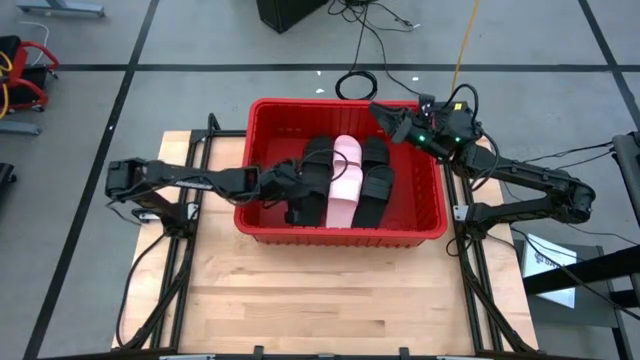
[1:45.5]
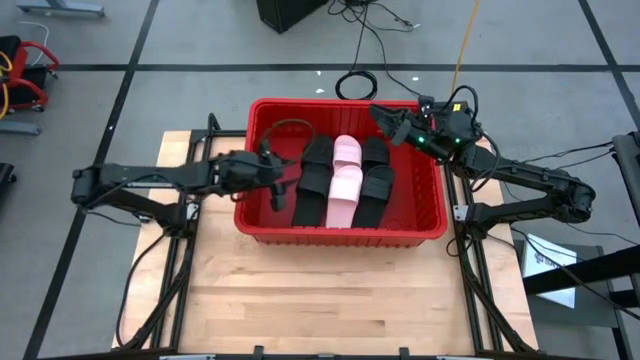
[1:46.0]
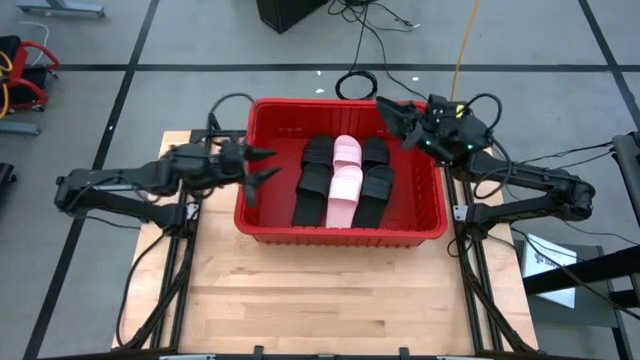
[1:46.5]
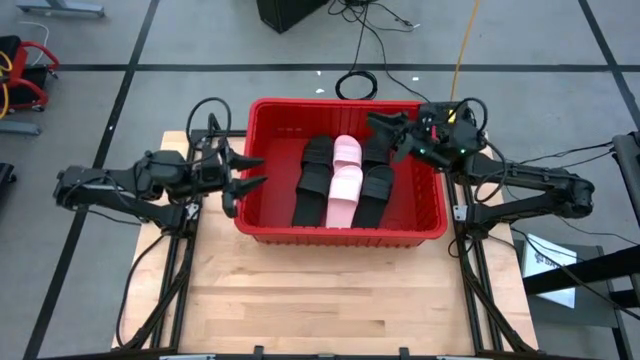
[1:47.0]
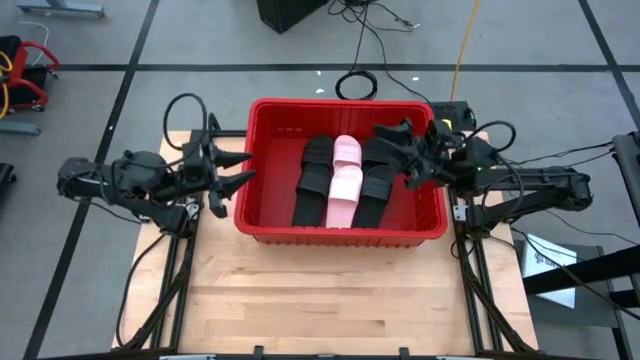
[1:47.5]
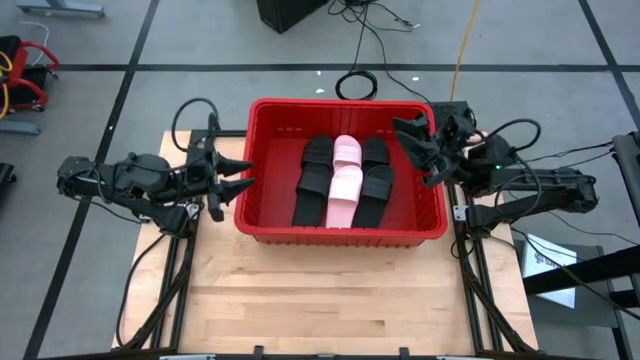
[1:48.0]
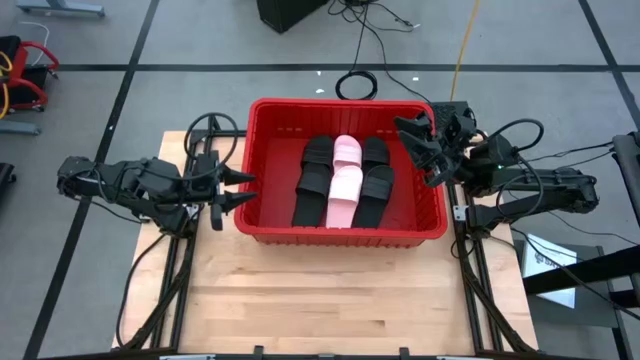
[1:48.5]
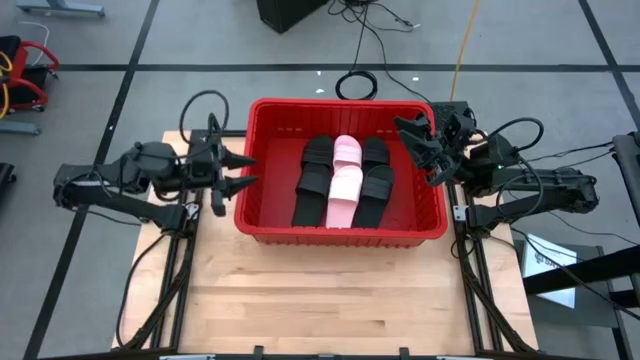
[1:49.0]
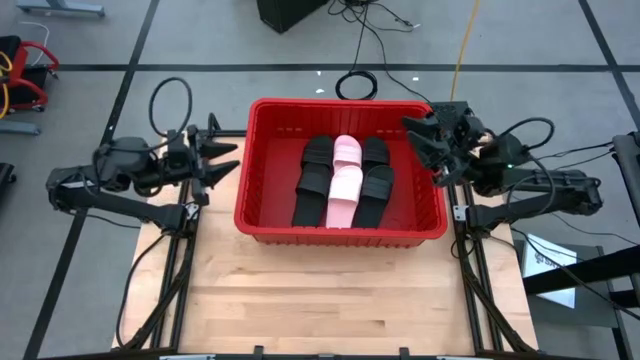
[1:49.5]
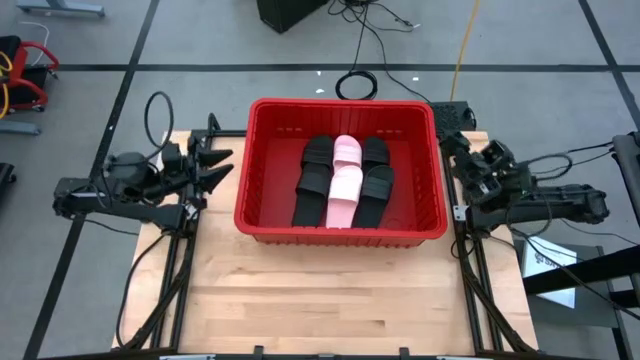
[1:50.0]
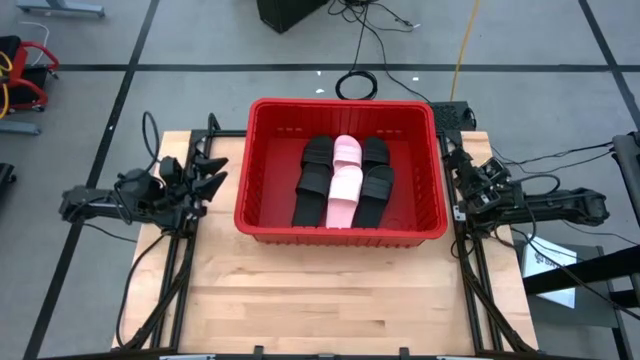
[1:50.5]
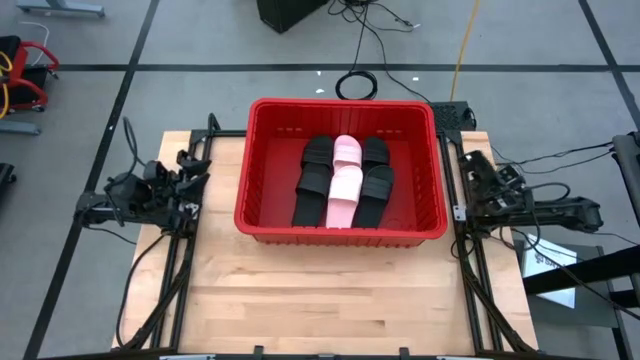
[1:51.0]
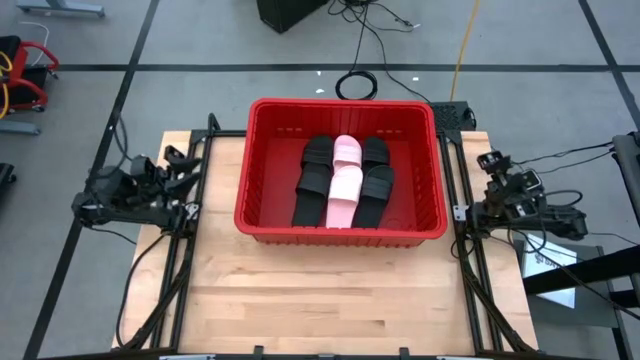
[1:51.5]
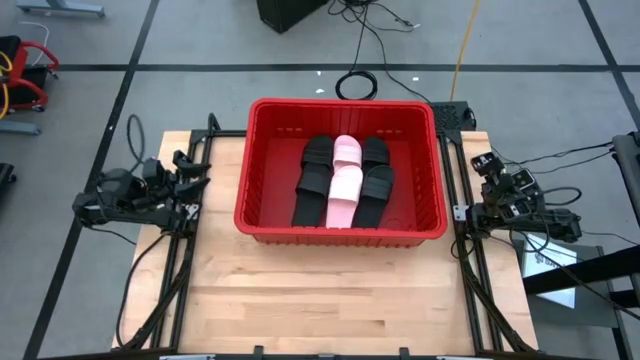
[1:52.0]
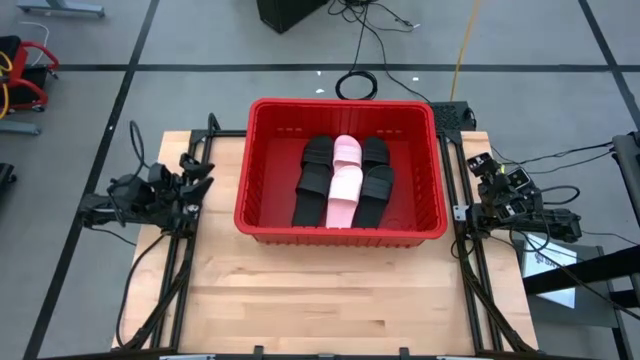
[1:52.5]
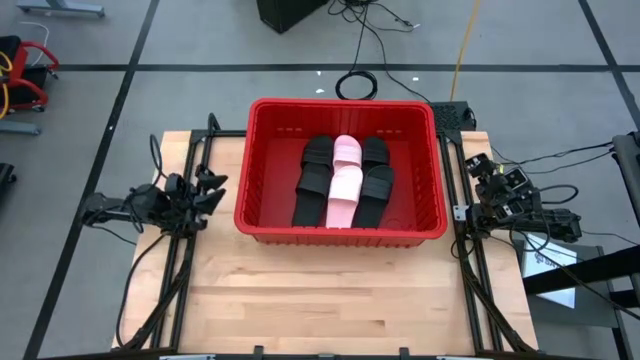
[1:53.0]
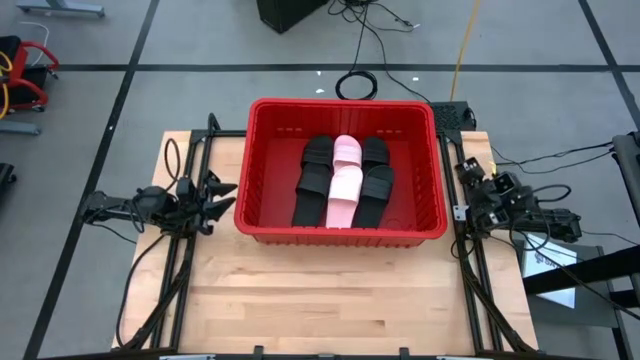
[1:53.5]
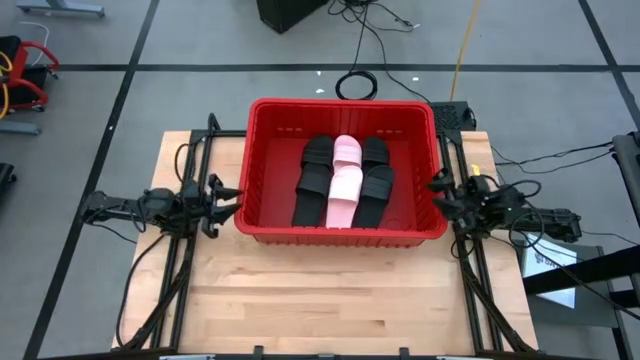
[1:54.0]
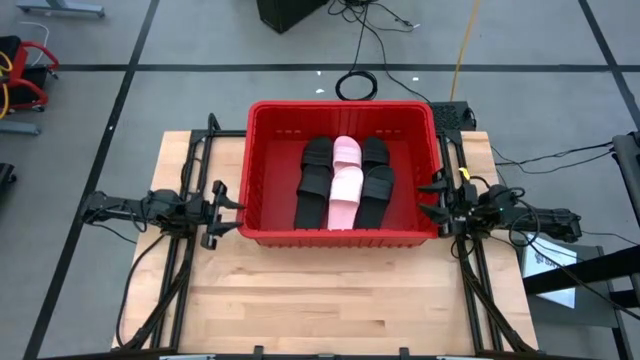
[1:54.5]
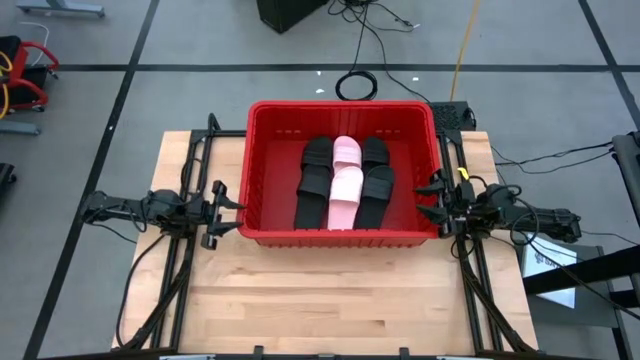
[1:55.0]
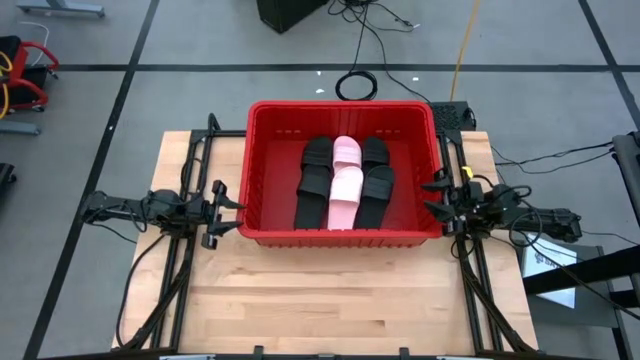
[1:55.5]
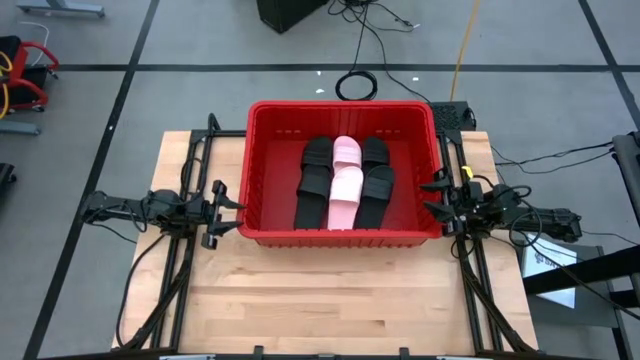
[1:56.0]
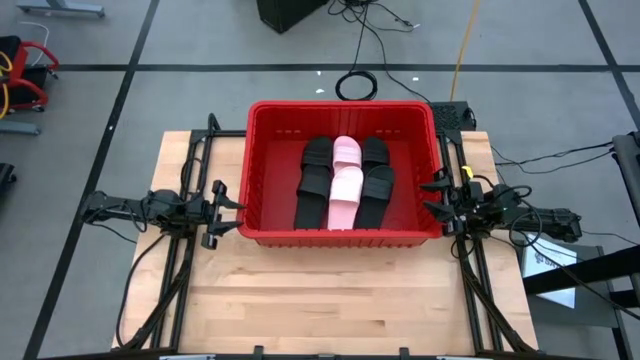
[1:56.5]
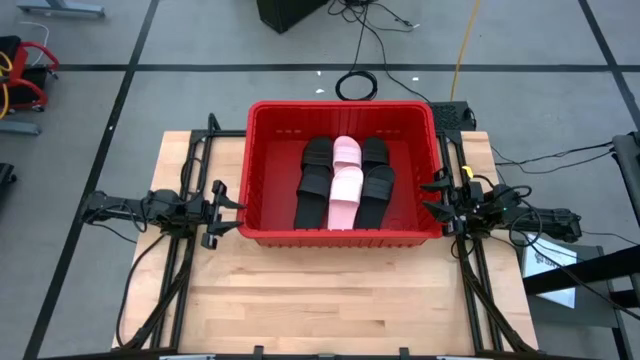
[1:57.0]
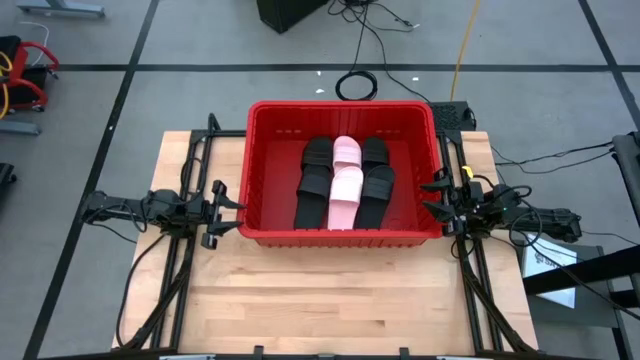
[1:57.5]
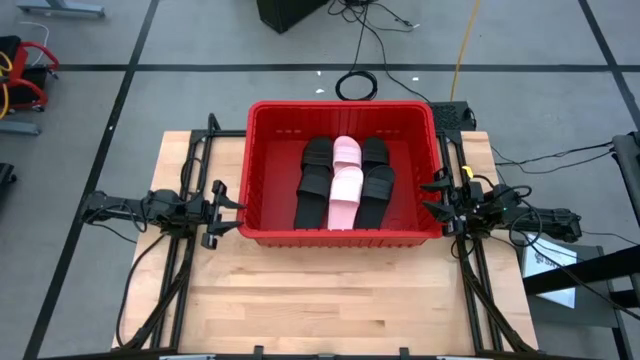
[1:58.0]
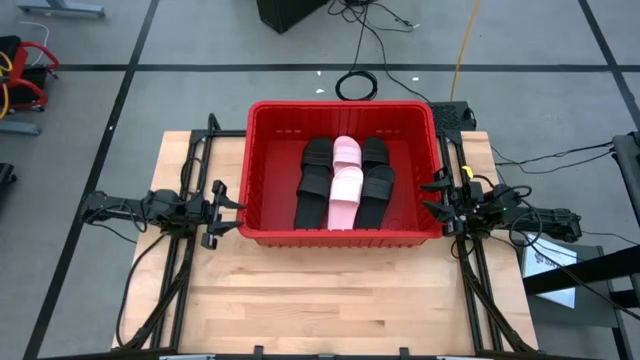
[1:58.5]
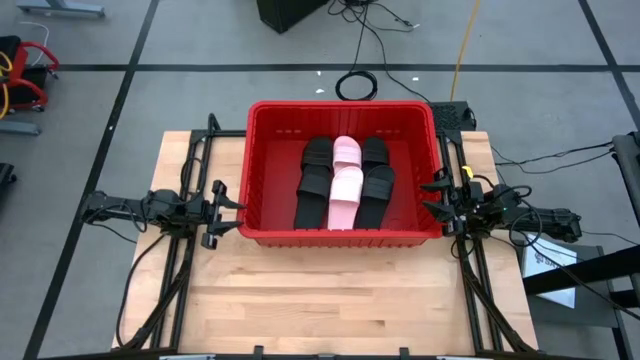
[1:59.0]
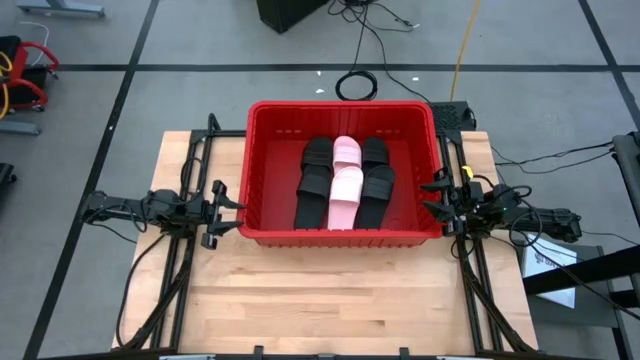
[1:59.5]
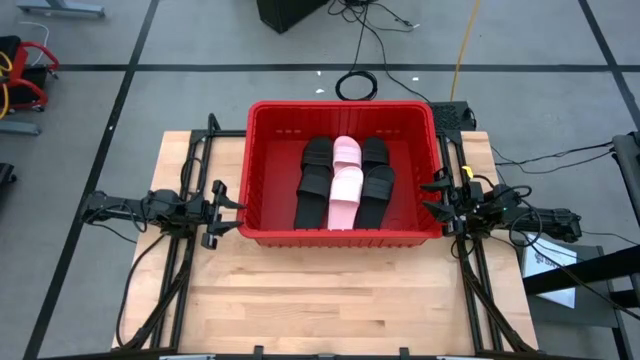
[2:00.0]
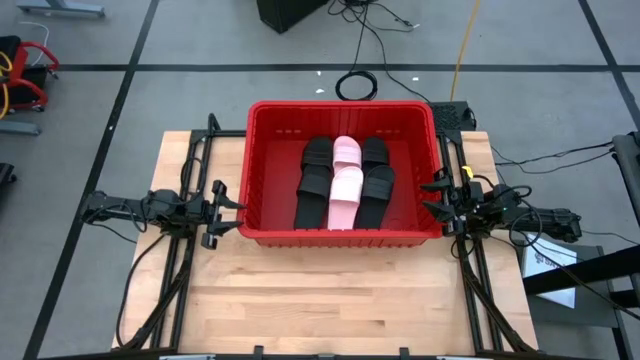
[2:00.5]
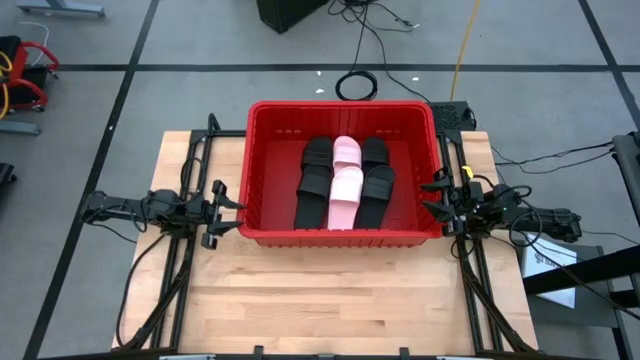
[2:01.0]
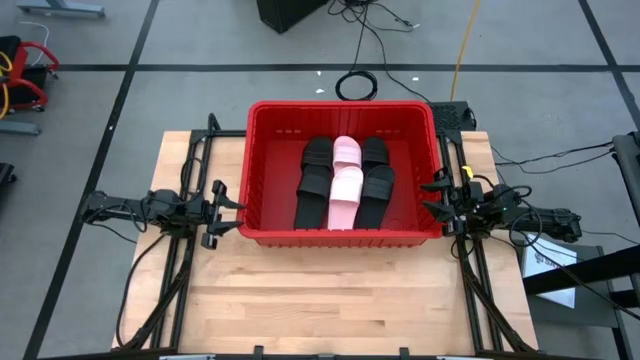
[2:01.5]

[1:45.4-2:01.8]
Task: Pick and place slides into bin
Return to Home Position

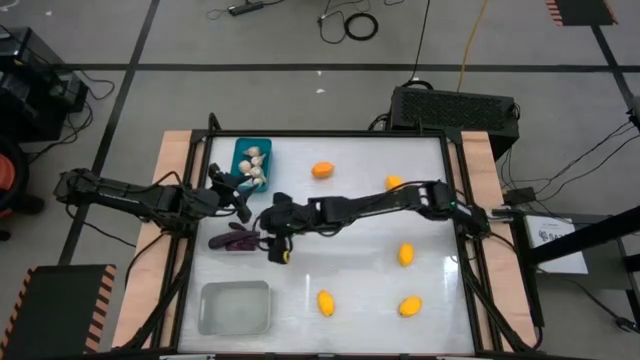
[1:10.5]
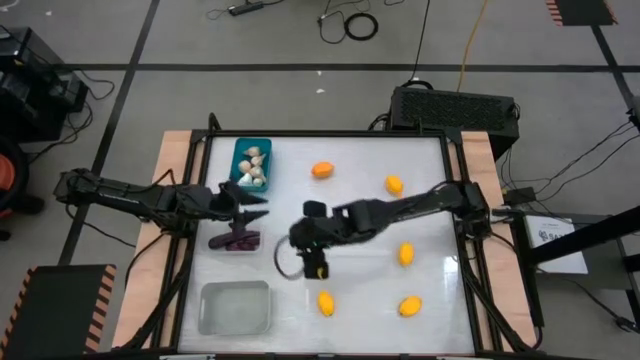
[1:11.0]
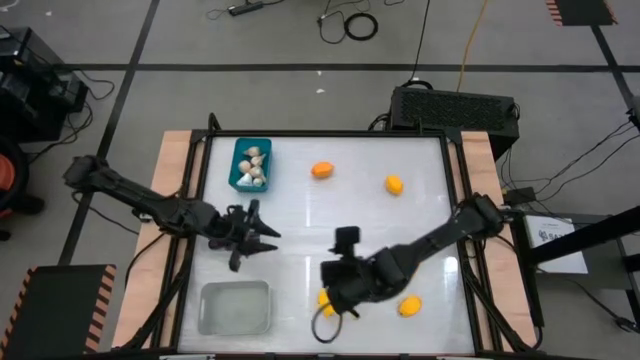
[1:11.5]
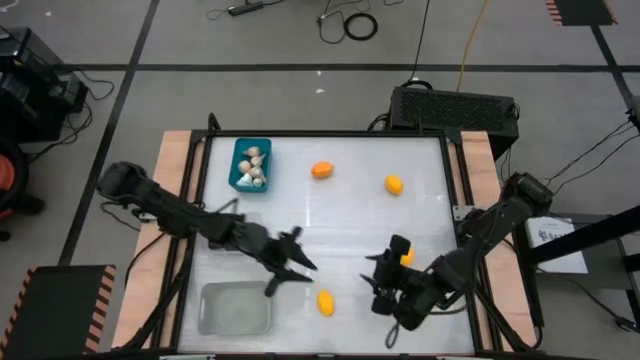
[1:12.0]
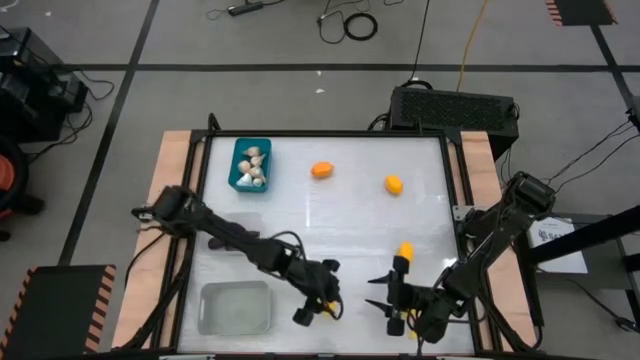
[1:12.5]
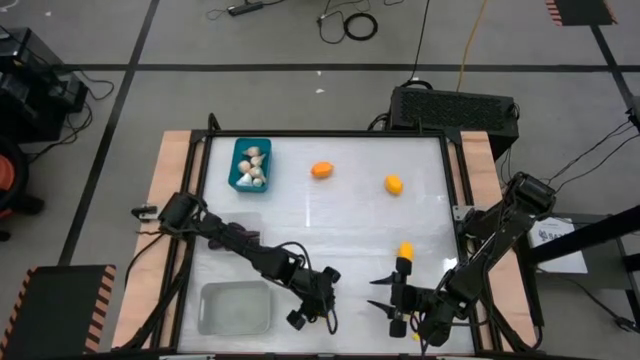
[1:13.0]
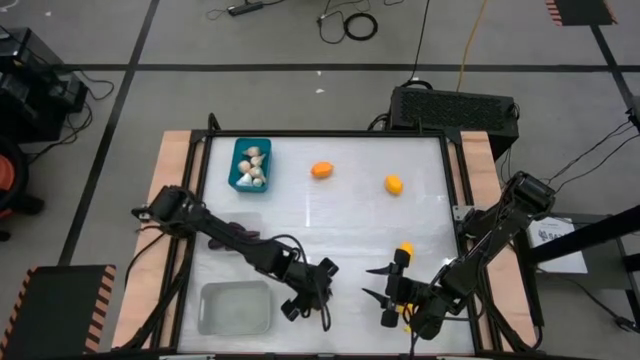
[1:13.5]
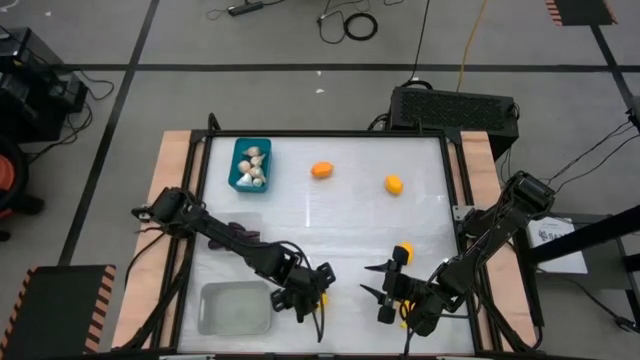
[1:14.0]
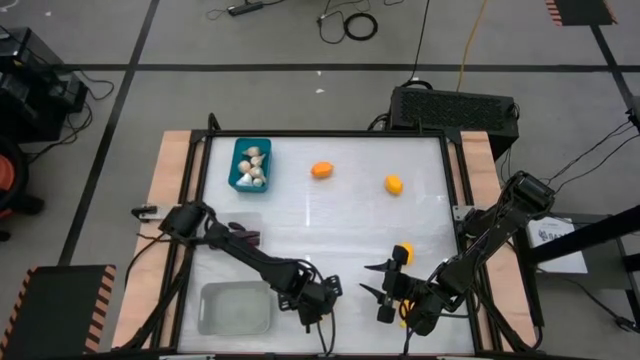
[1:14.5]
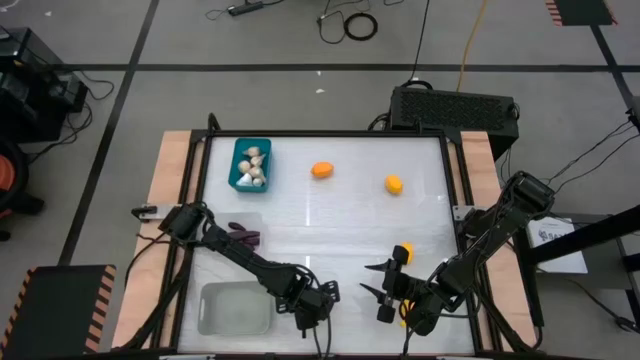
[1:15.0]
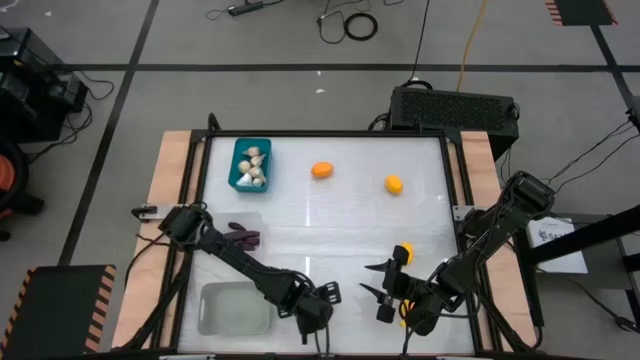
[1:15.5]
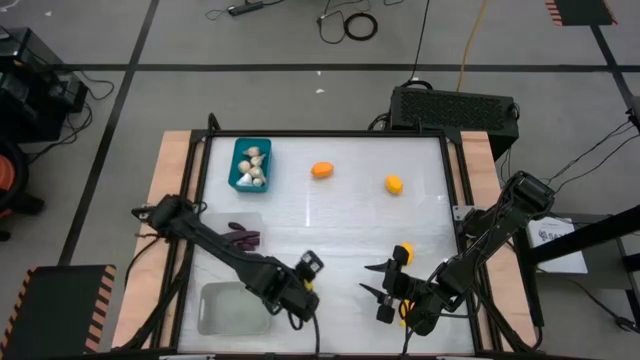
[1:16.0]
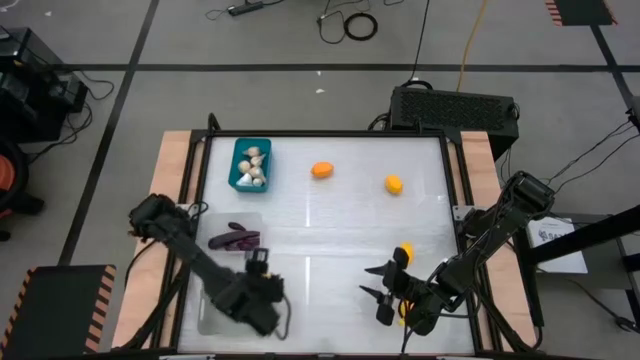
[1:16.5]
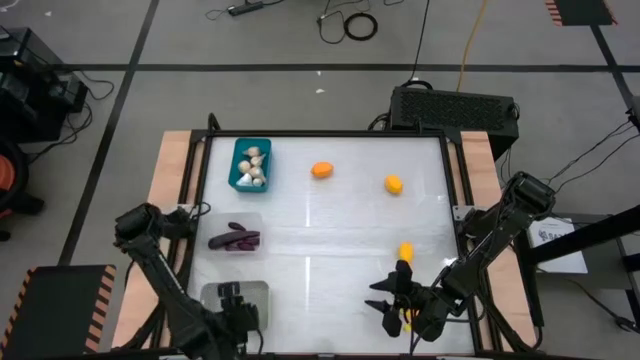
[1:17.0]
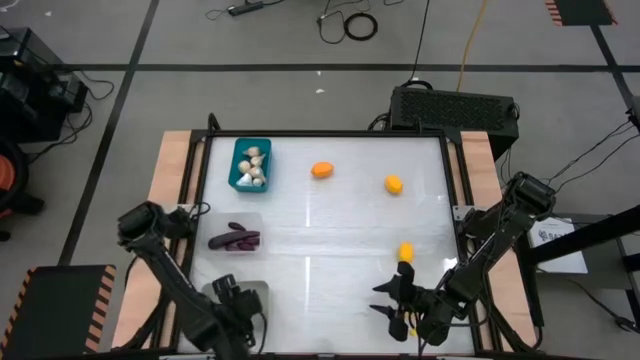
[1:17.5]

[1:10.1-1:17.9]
Task: Sort produce into baskets
Put the lemon into the gray bin
